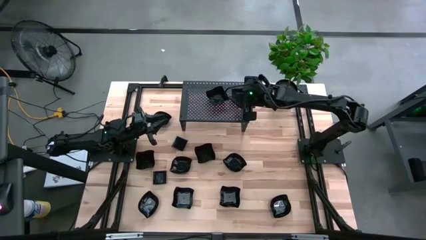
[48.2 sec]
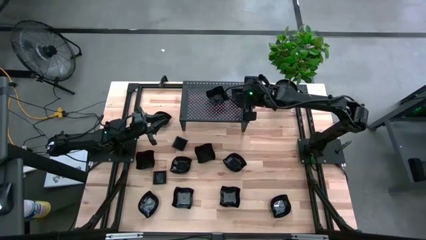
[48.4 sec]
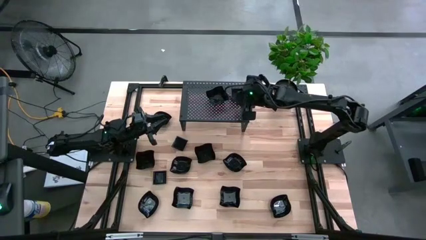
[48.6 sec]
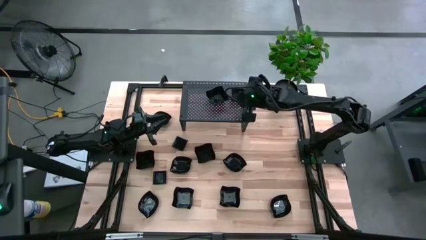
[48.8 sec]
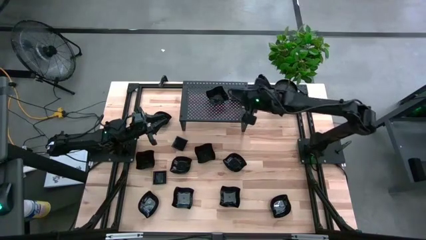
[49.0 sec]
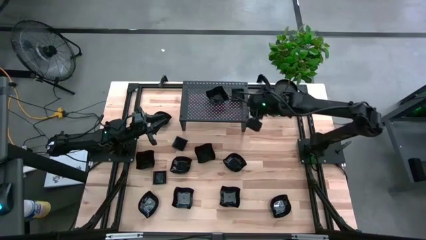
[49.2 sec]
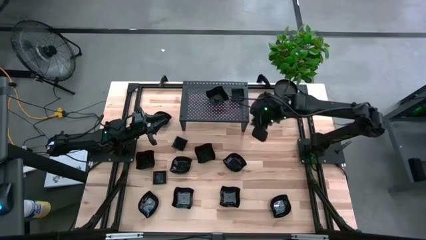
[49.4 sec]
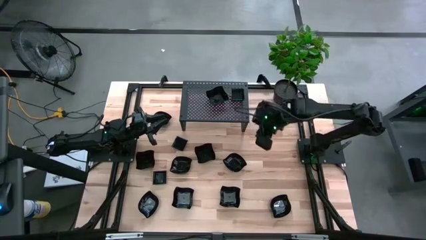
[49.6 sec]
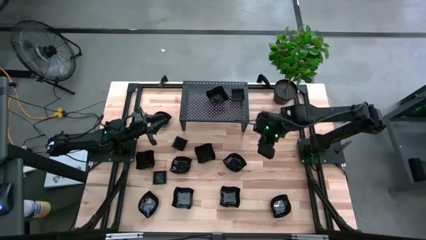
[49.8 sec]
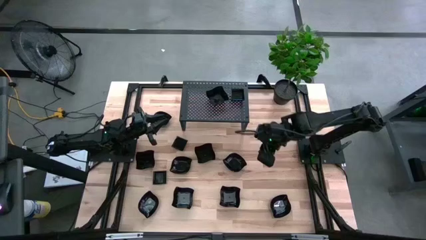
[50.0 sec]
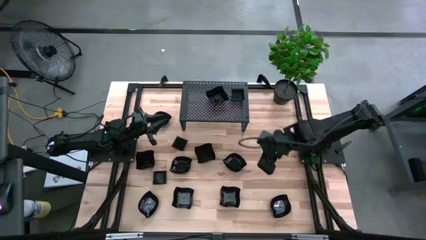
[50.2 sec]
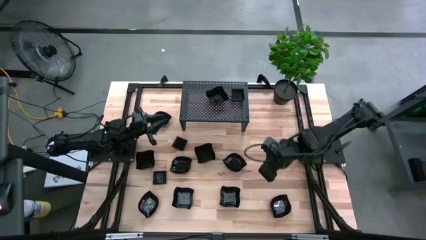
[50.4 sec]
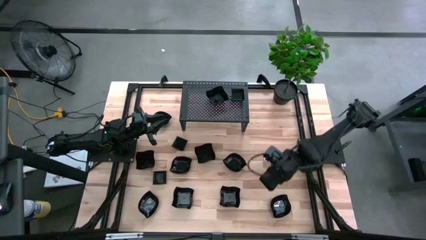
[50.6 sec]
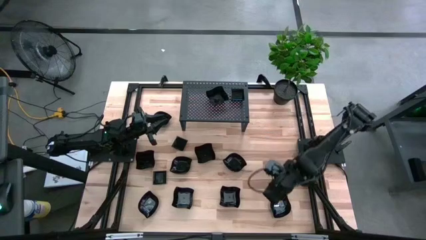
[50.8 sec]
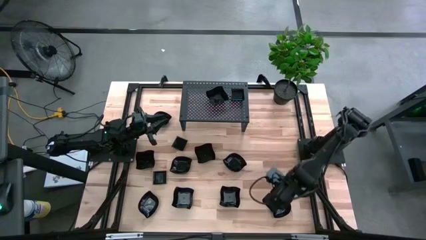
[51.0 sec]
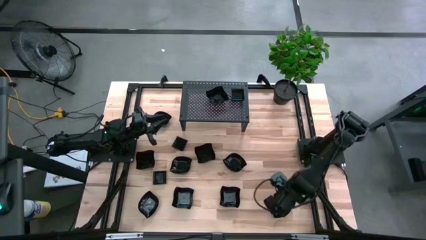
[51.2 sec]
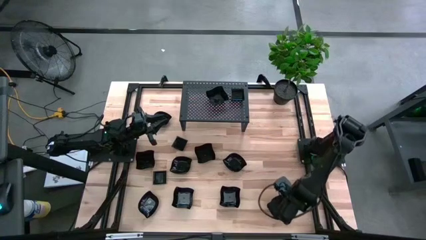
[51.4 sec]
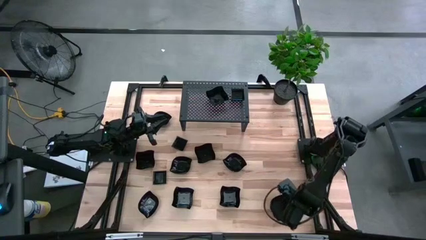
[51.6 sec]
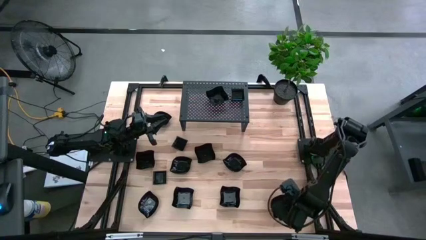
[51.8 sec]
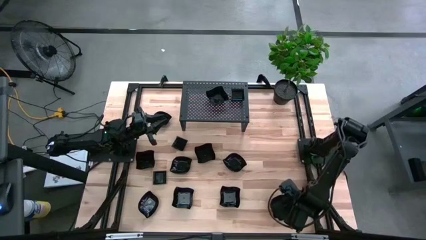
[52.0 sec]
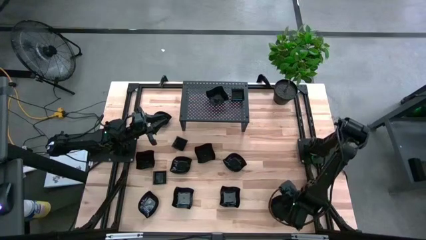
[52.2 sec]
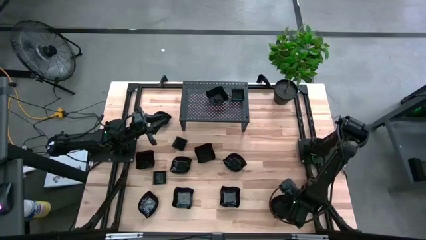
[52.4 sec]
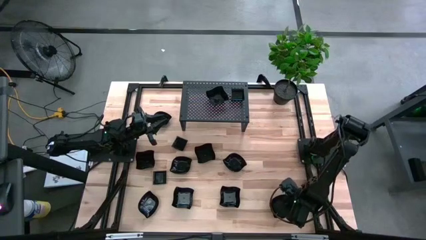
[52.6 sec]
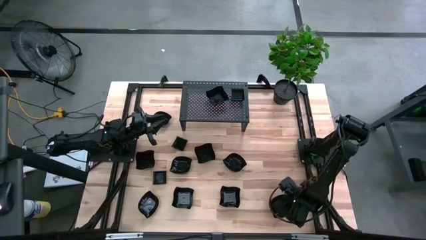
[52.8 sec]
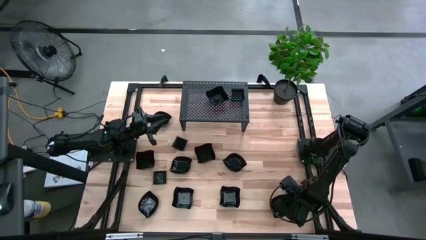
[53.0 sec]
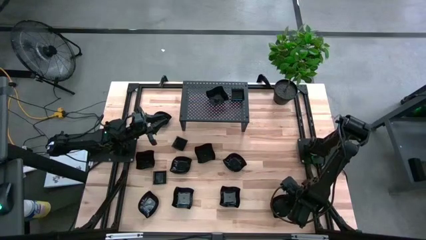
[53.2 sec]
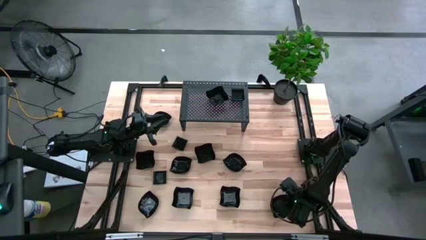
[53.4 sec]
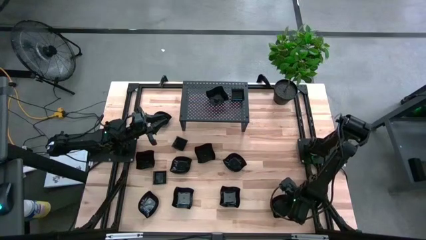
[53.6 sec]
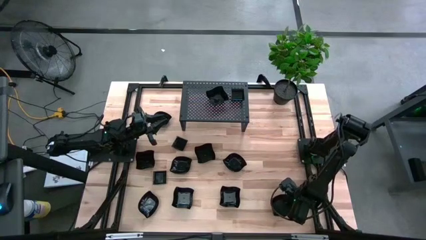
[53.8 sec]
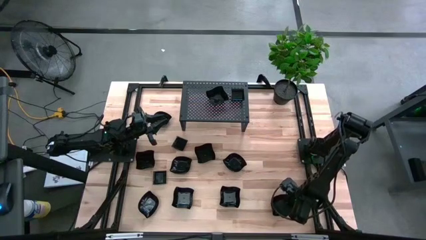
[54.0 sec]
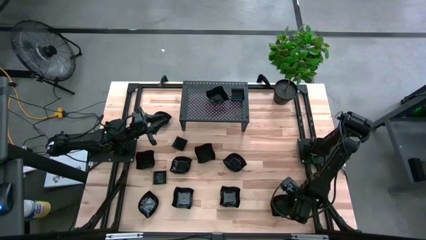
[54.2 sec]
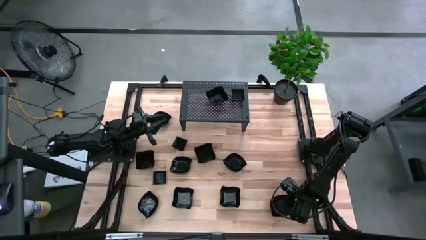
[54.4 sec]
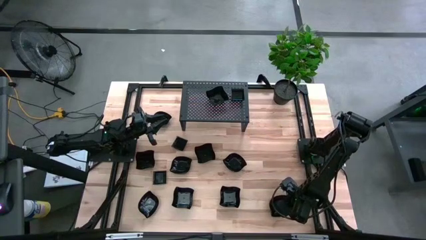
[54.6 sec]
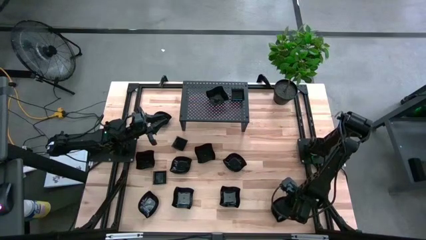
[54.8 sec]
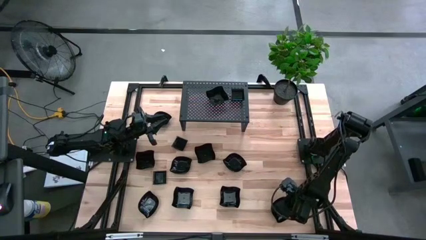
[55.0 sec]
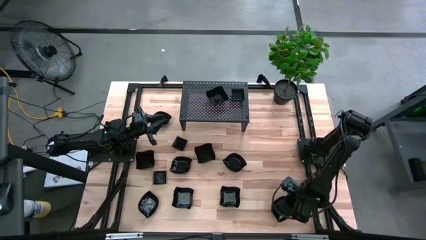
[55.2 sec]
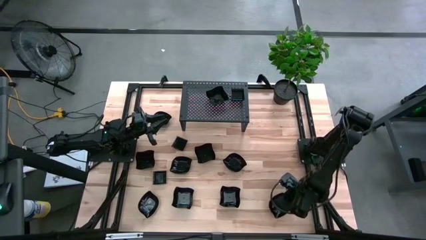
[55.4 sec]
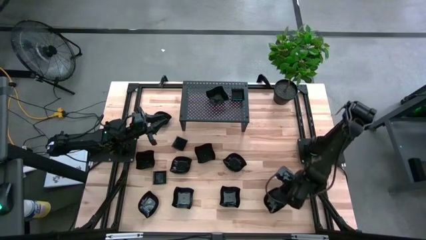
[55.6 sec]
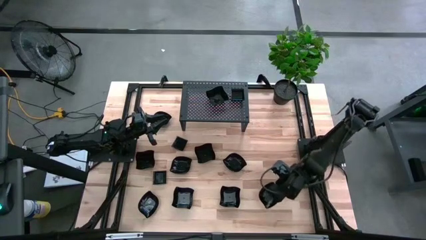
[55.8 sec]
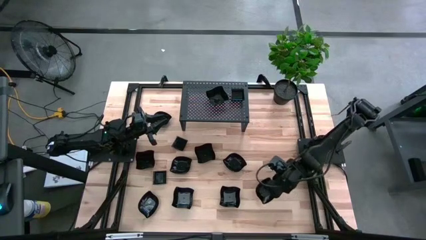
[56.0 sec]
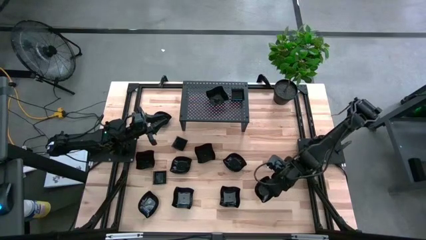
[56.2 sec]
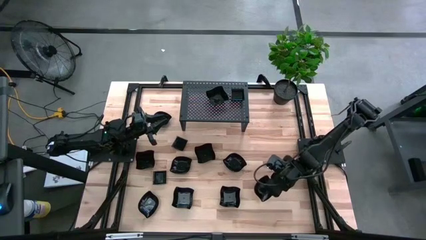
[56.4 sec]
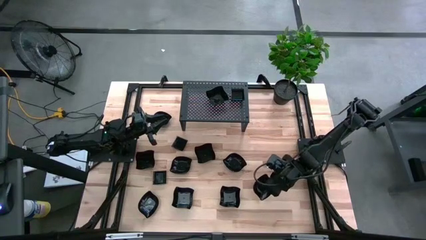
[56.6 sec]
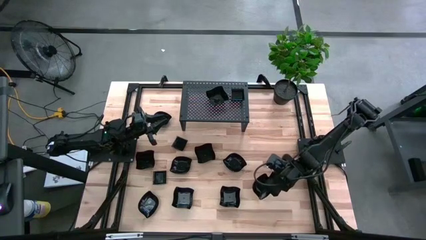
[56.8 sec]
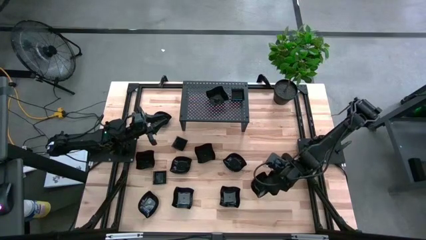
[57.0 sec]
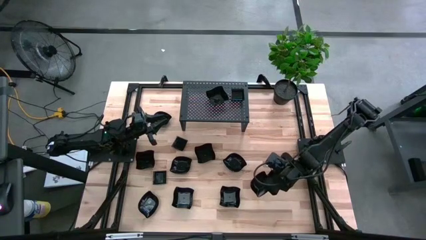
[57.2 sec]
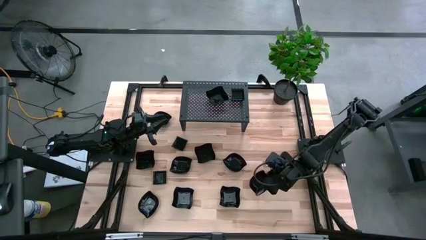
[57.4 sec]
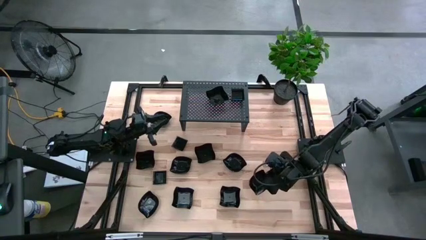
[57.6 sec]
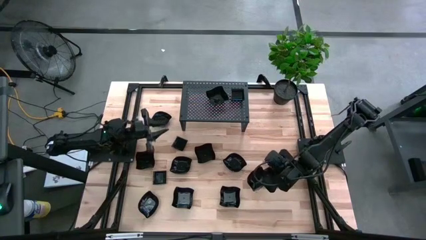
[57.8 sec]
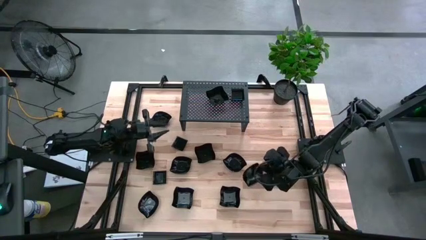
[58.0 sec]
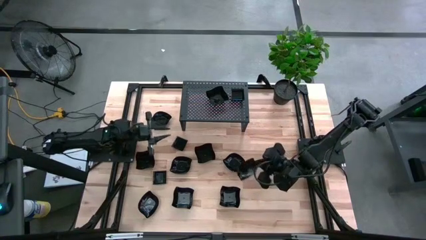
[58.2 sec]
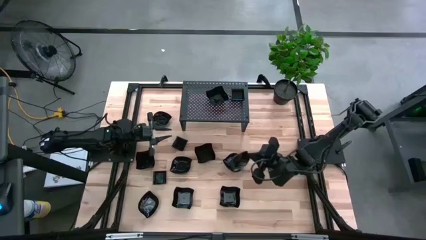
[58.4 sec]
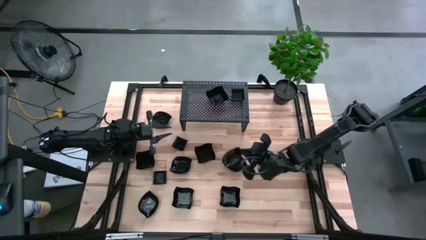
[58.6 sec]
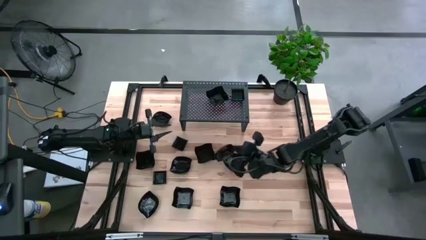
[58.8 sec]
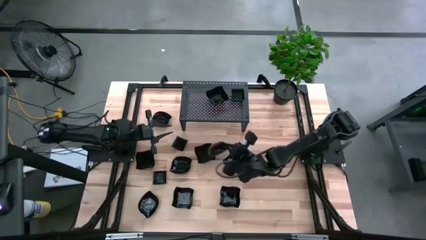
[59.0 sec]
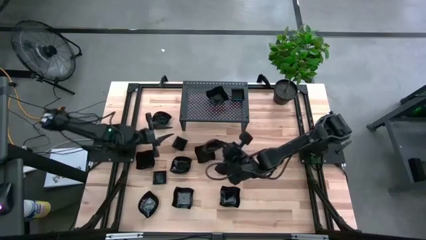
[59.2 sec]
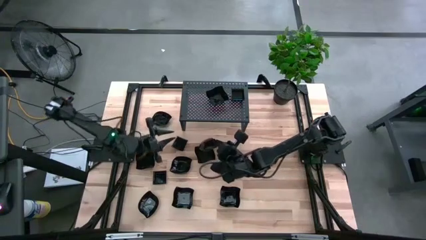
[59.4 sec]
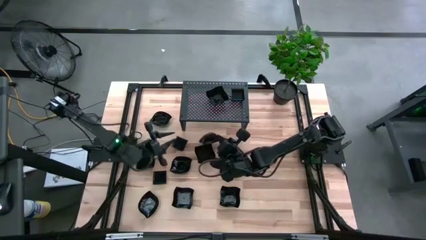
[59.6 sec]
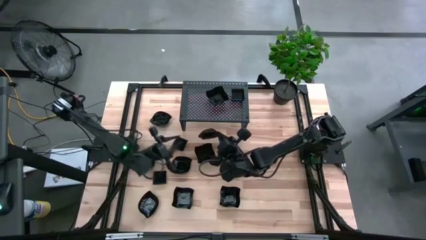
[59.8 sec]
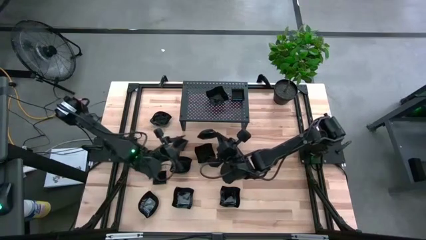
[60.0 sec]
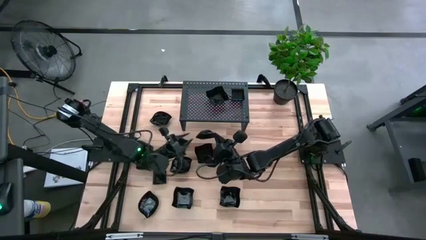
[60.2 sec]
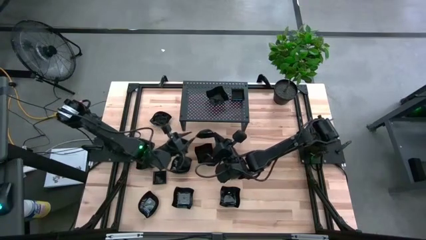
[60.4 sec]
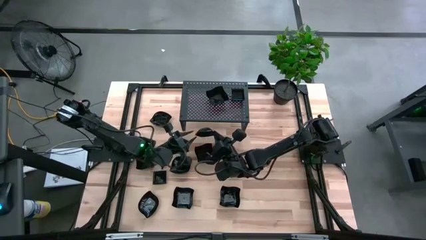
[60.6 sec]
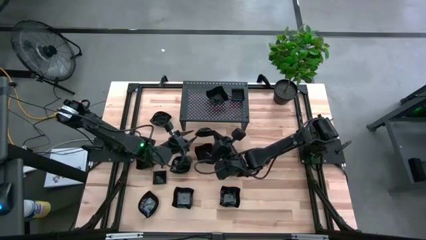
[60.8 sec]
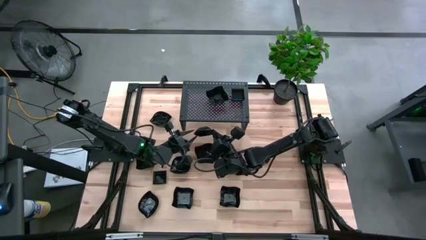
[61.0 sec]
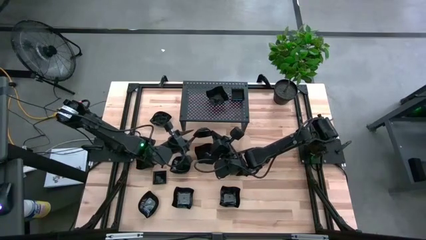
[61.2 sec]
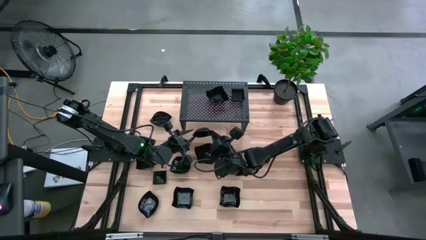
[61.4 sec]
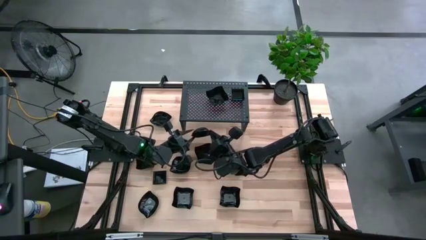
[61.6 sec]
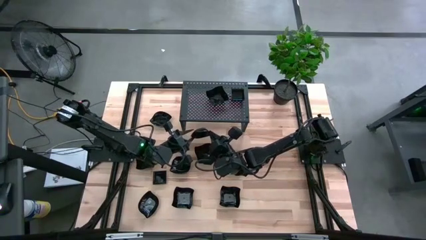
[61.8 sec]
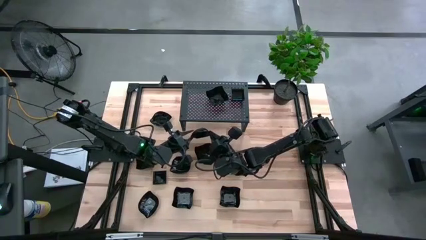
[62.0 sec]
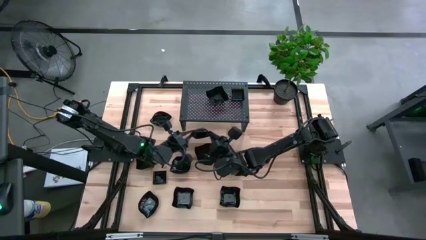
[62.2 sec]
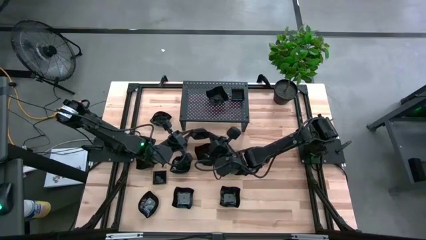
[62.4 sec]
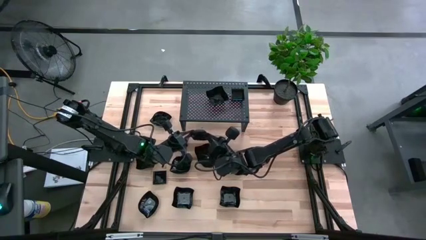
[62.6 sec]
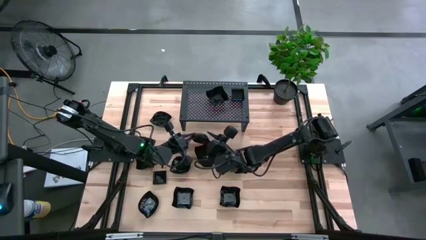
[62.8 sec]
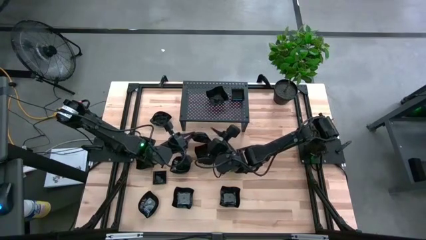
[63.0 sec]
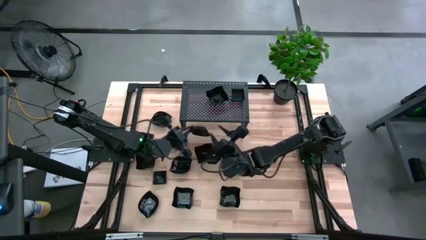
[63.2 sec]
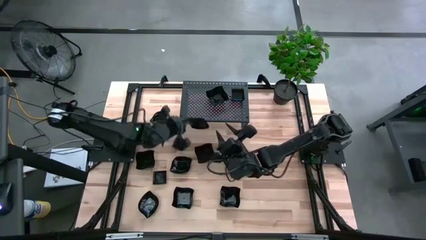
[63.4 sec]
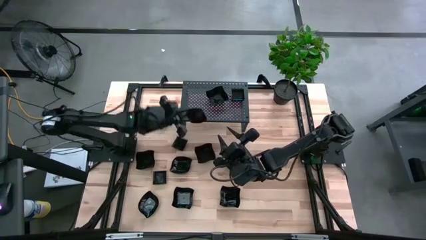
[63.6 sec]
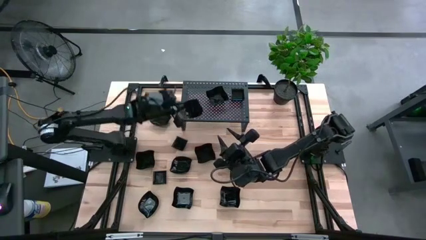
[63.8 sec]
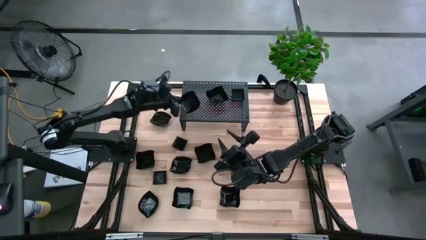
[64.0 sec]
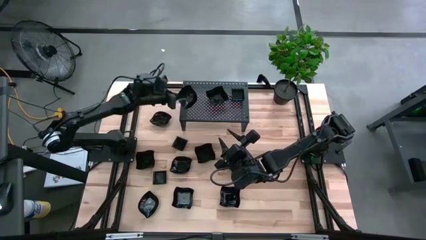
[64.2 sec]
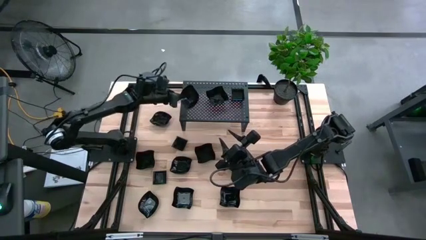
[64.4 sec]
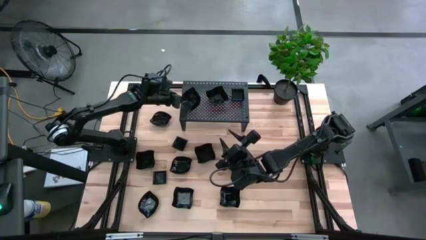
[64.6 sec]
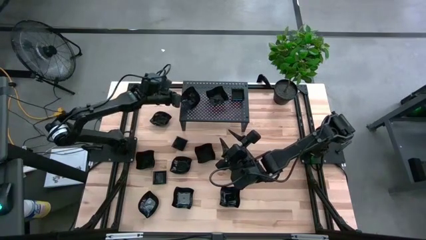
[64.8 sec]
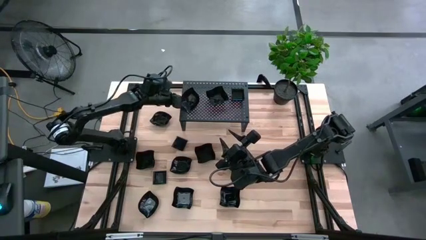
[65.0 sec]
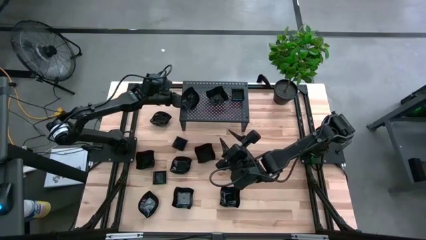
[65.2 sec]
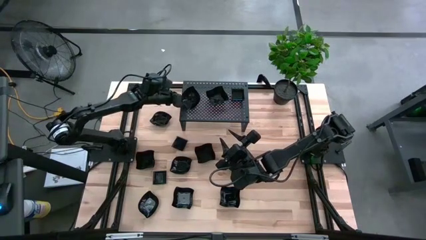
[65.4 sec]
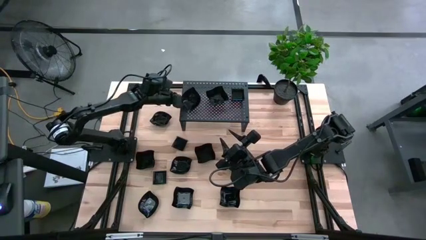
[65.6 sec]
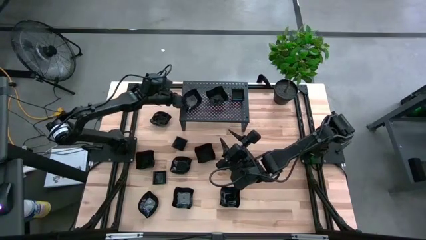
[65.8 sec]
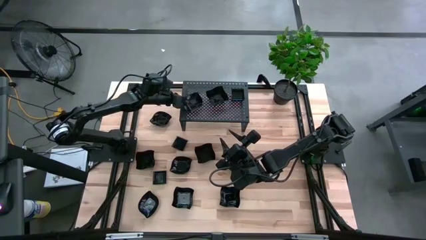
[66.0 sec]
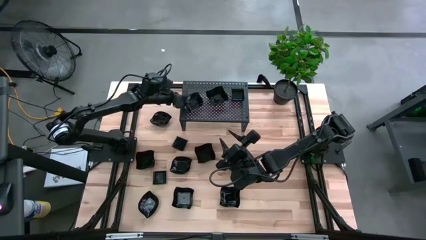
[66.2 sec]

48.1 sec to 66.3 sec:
Task: Pick & Place Mini shaped plates
Put the leaf shaped plate on the shelf
